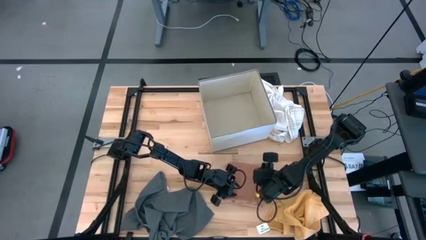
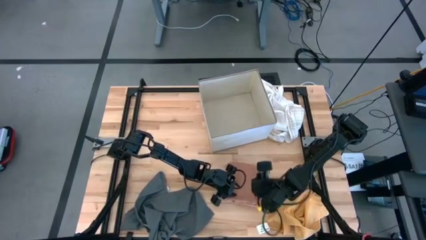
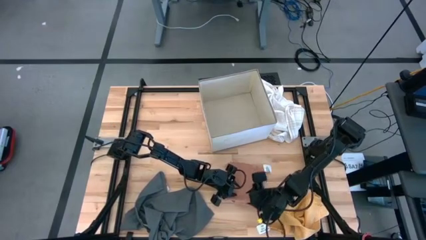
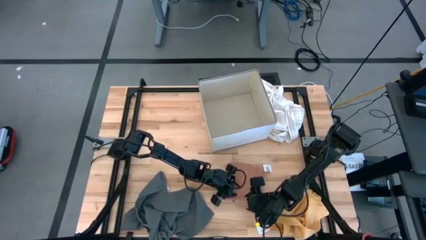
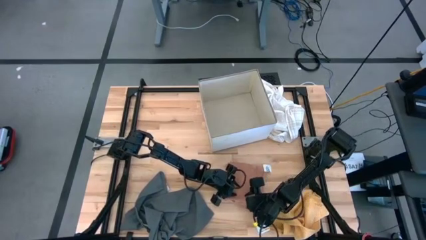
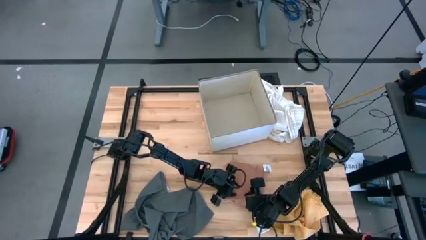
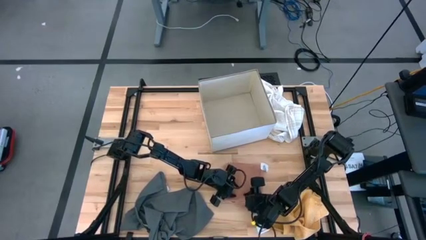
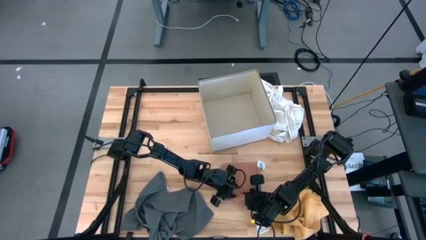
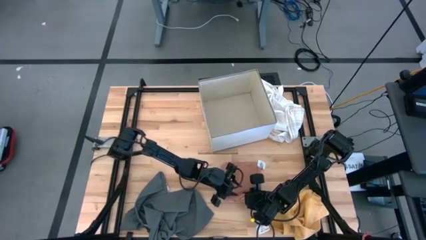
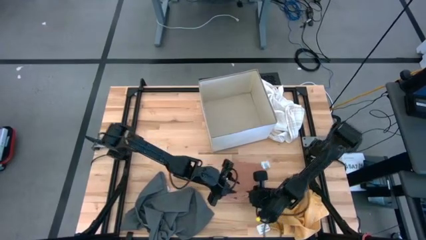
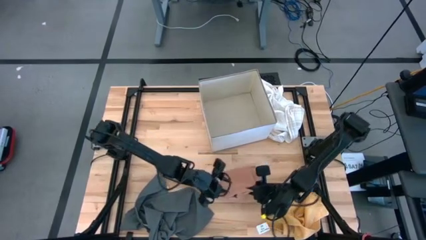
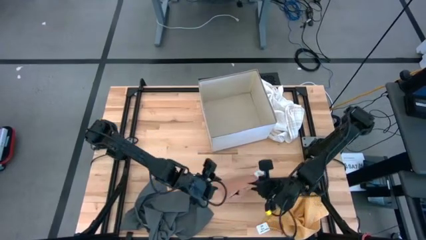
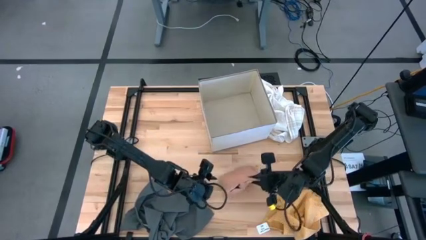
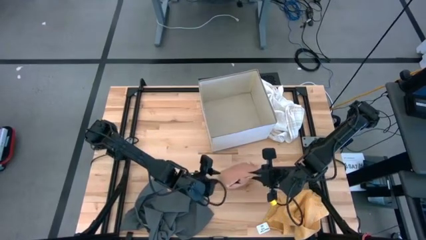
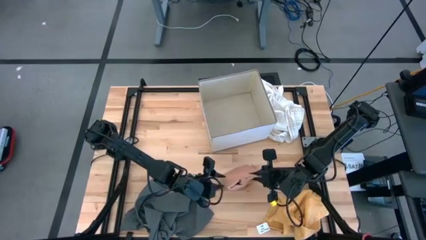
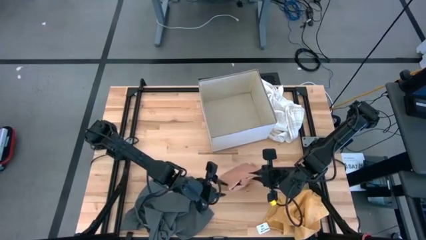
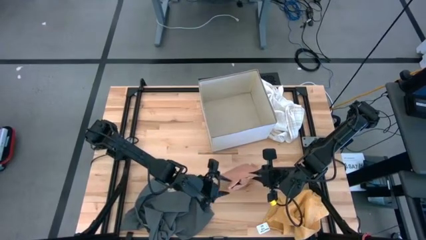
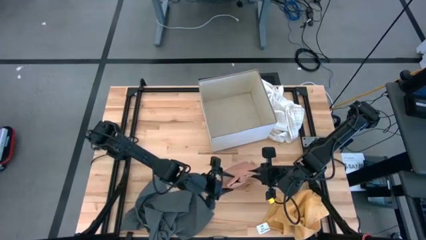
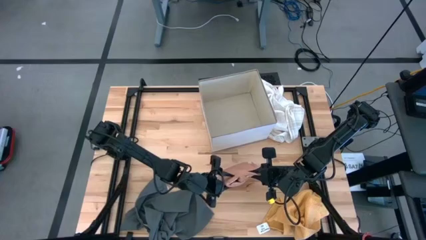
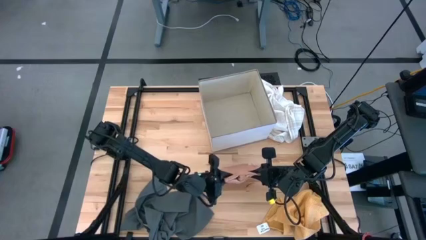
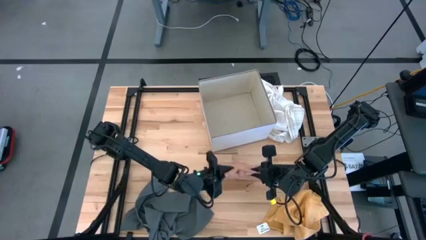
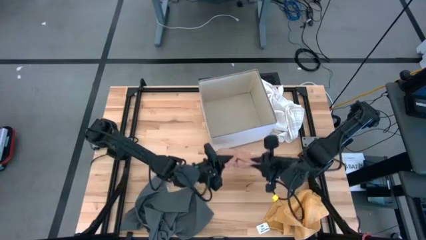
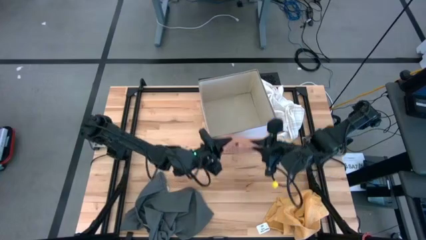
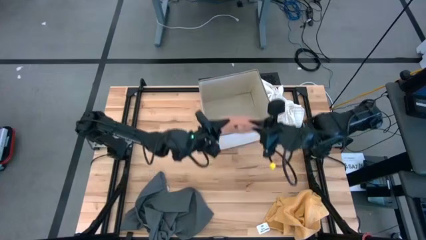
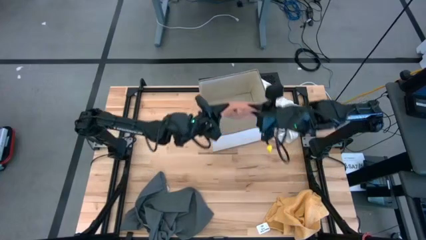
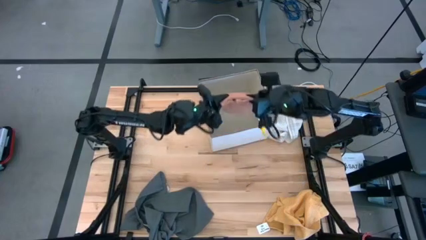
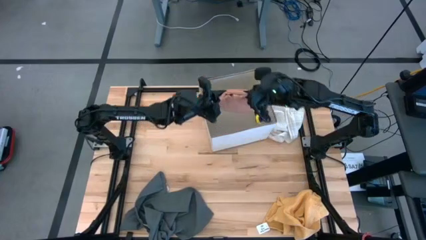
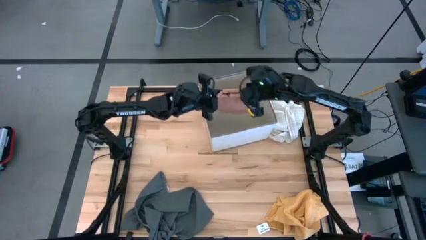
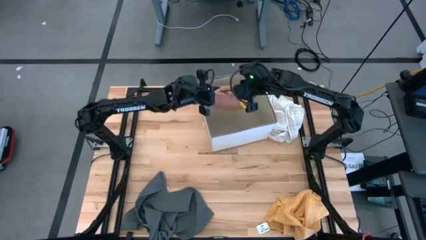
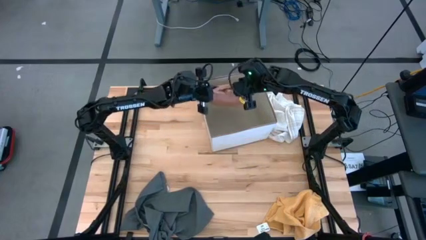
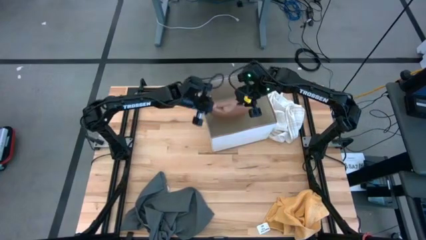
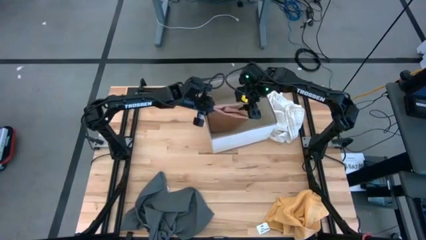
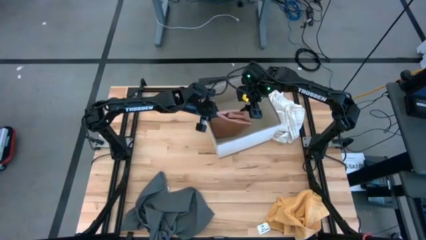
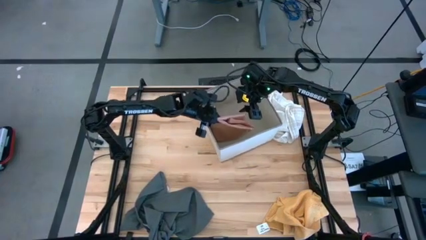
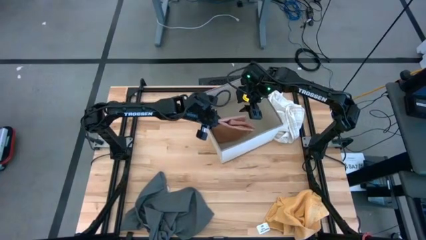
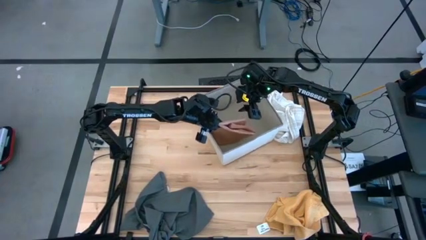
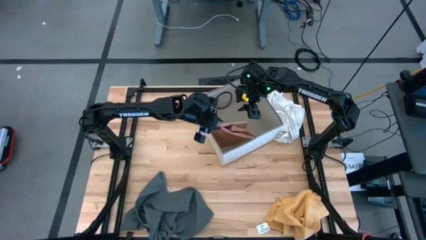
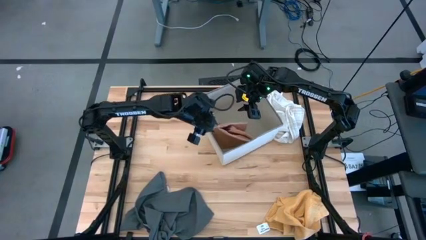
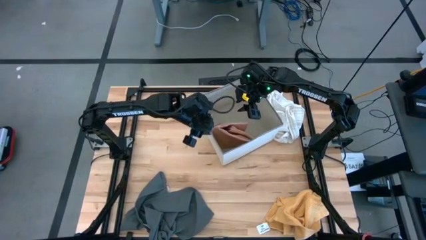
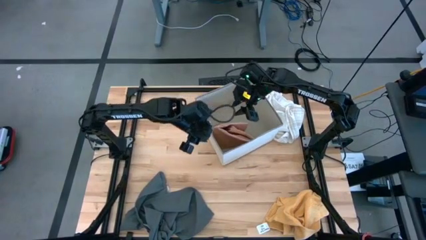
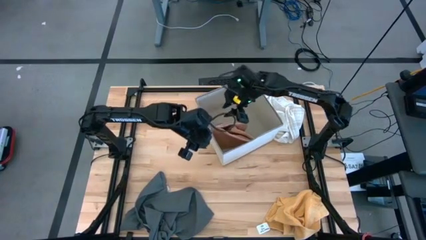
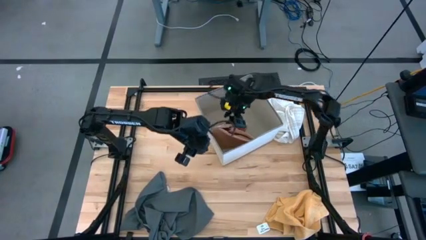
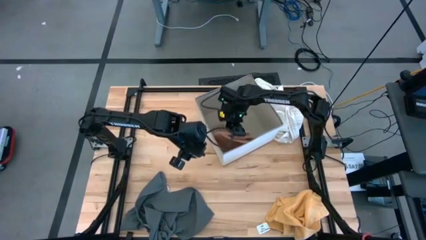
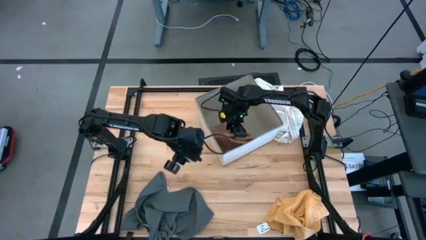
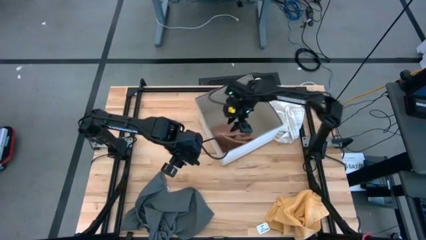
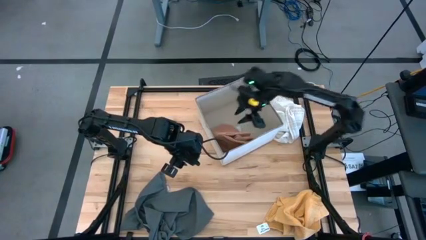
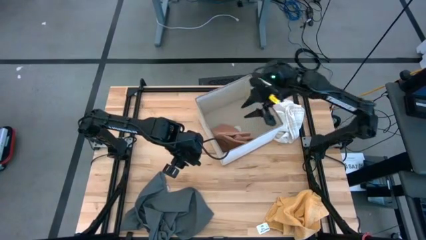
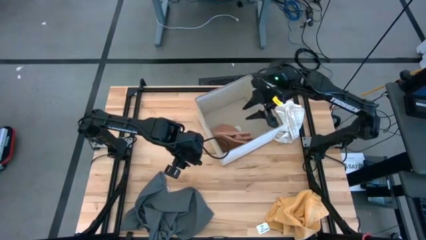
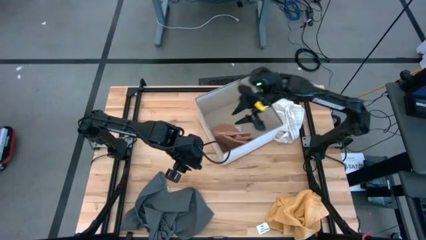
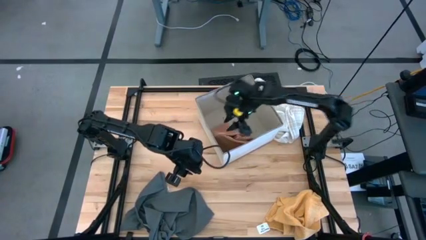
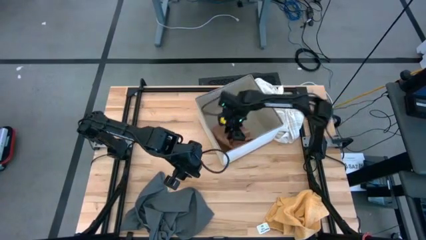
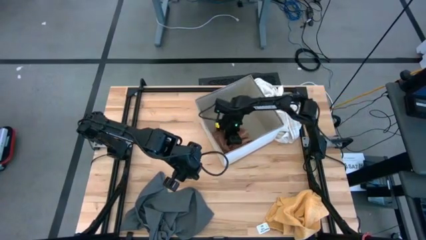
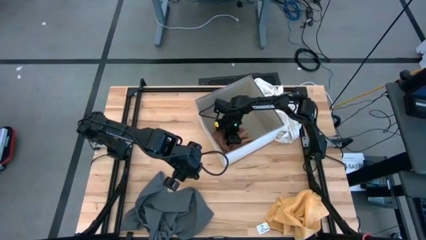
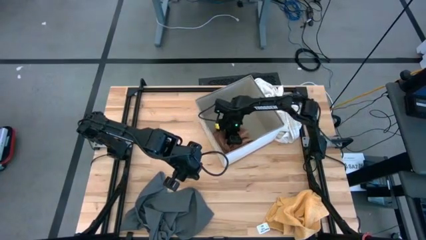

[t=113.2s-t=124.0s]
Task: Fold towel
Put the folded brown towel into the laundry organizer

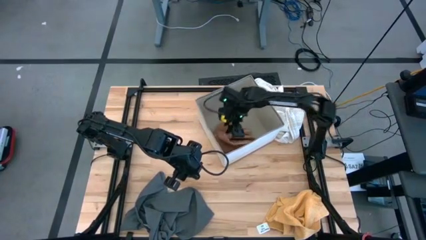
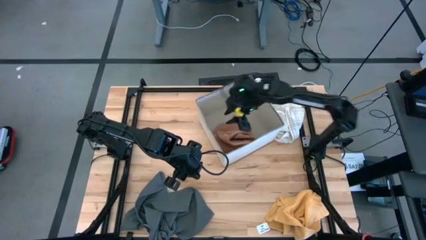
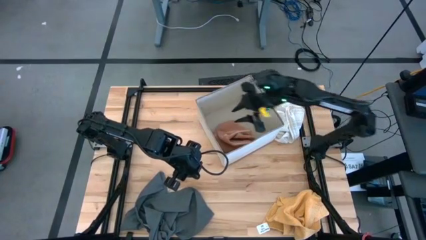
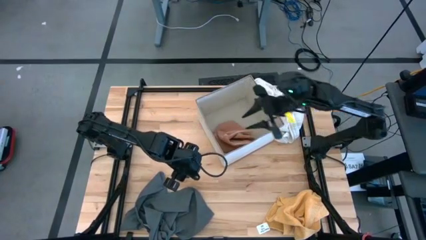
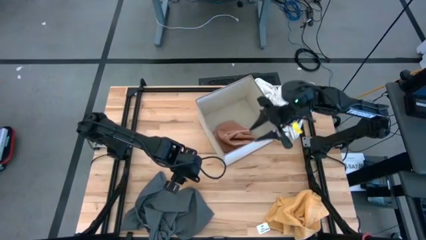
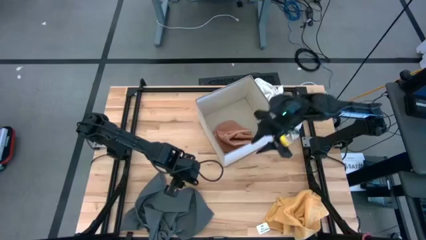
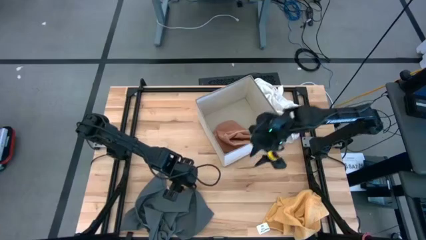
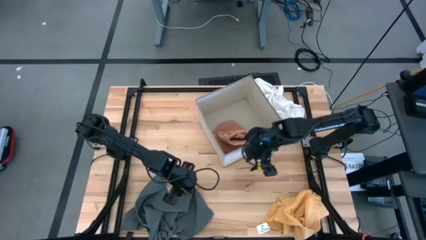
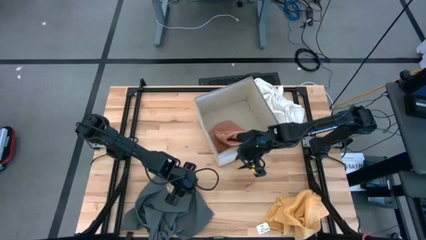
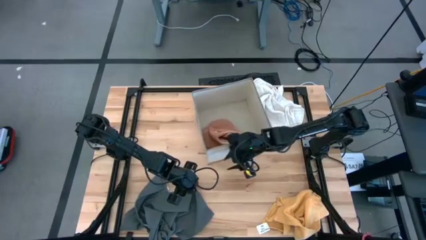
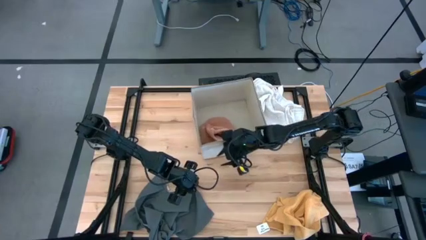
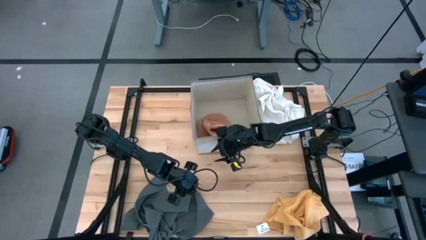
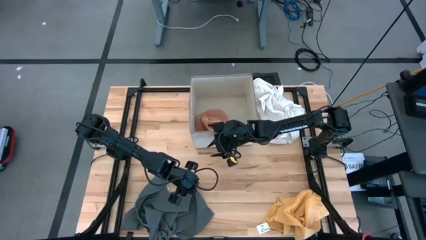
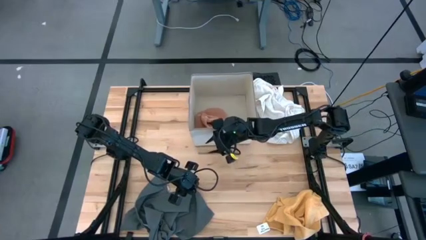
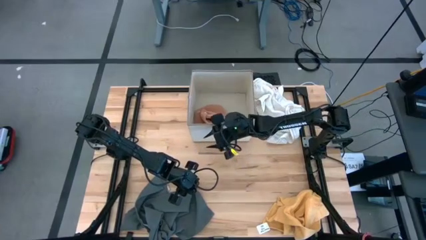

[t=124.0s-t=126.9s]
Adjust the laundry organizer
